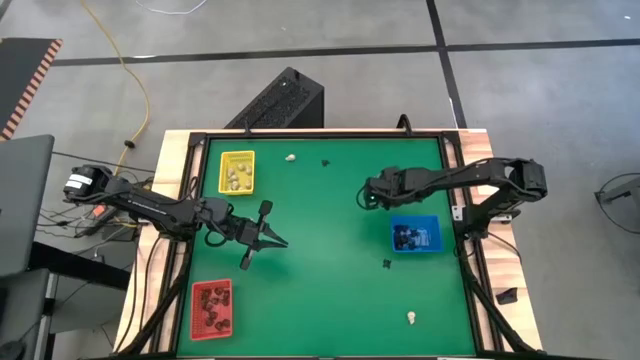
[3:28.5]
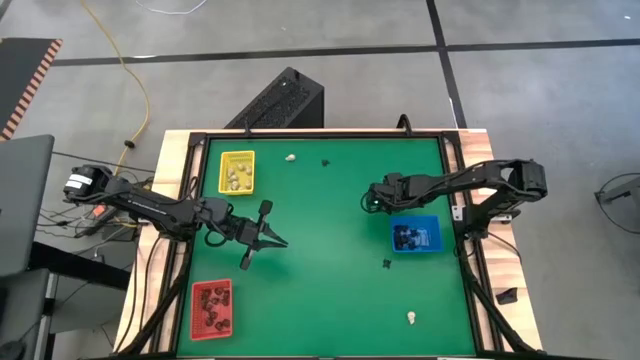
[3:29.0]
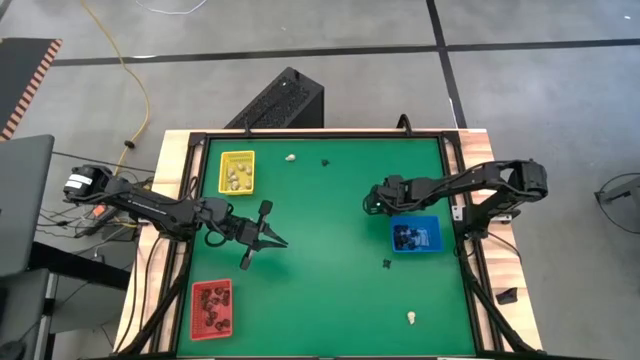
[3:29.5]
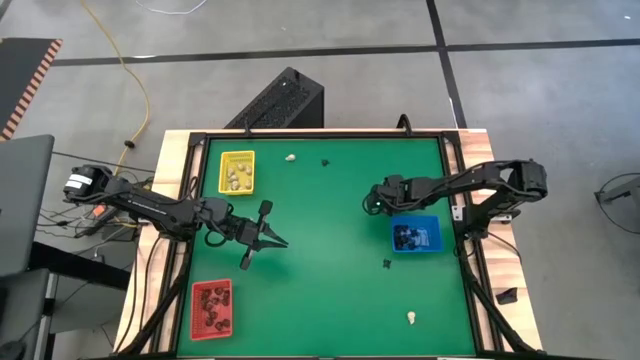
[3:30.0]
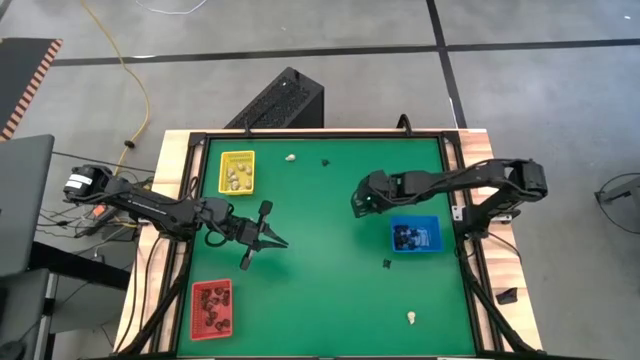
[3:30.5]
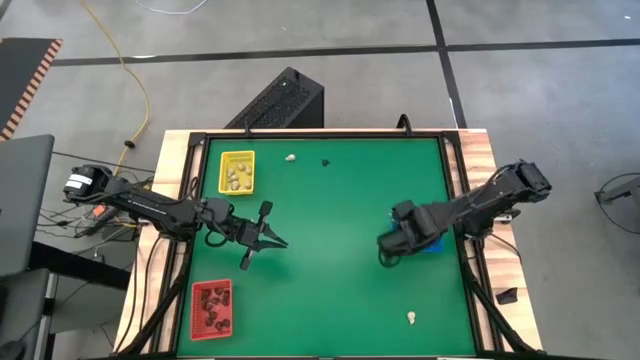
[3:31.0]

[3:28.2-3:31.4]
Task: Sort Halloween decoration
Put the black spider toy into the blue bin

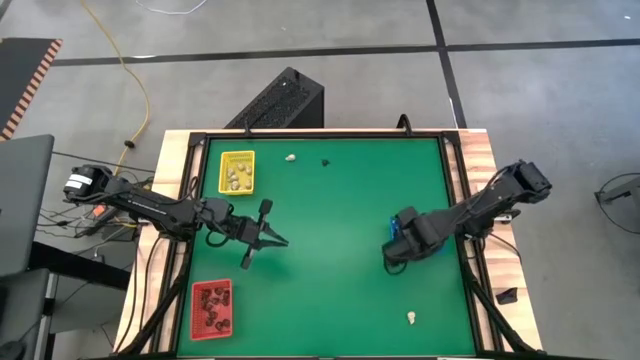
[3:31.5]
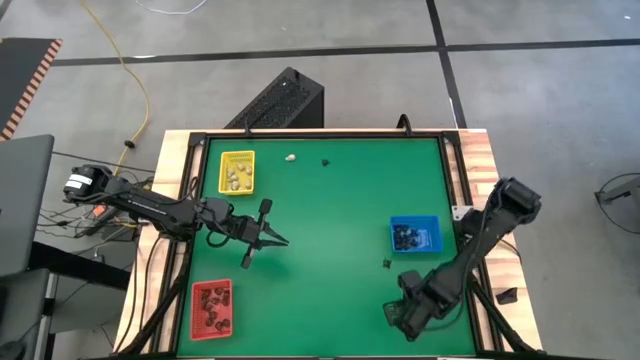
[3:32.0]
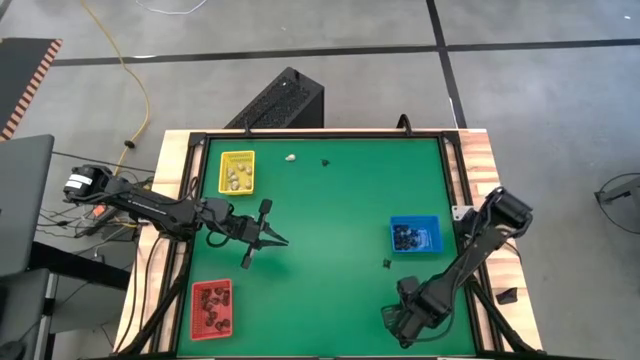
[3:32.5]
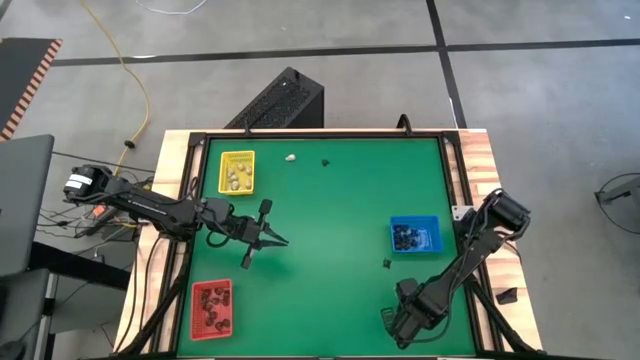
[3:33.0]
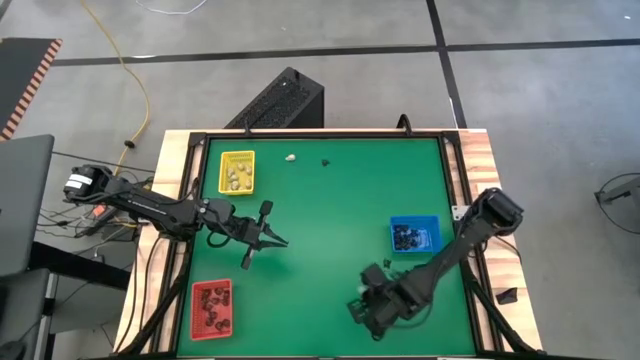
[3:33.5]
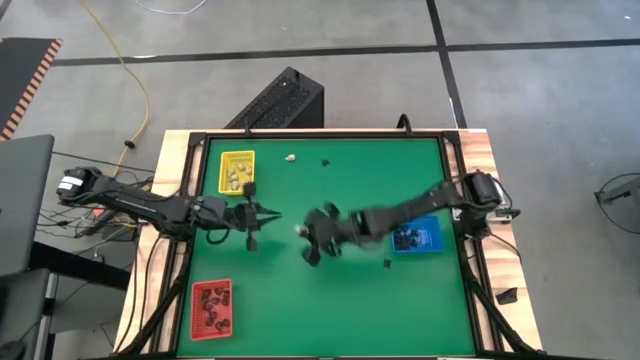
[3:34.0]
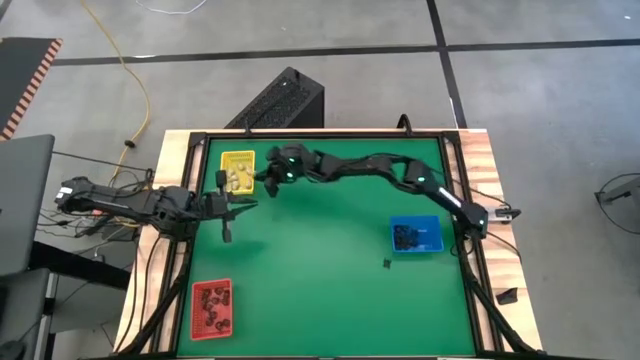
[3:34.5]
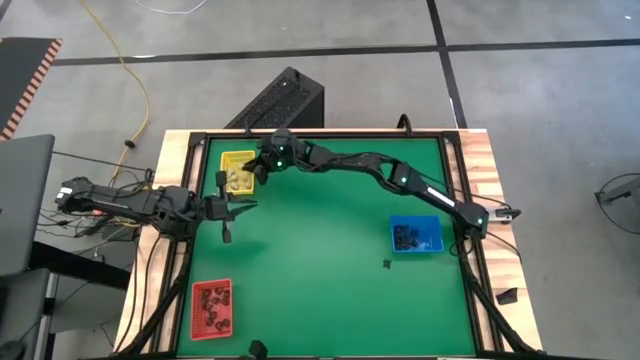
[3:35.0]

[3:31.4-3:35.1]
Put the white skull toy into the yellow bin

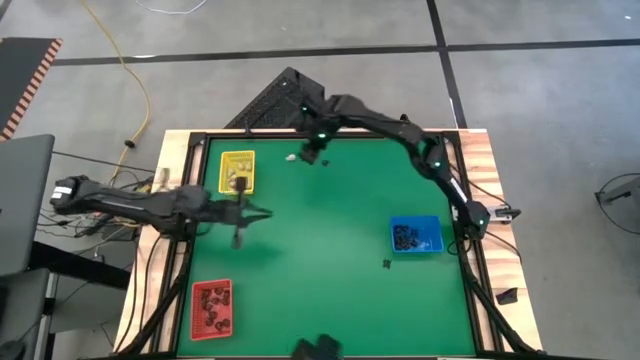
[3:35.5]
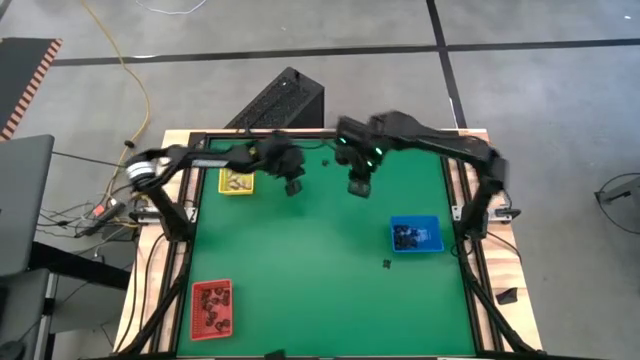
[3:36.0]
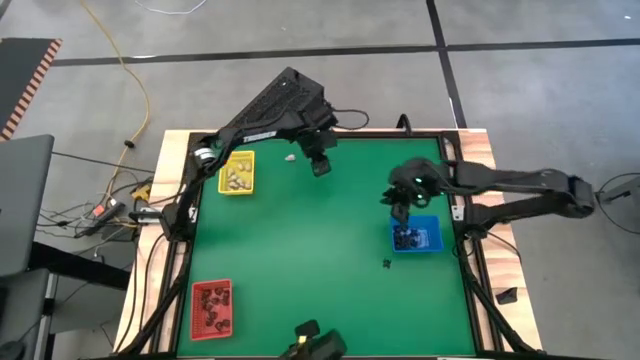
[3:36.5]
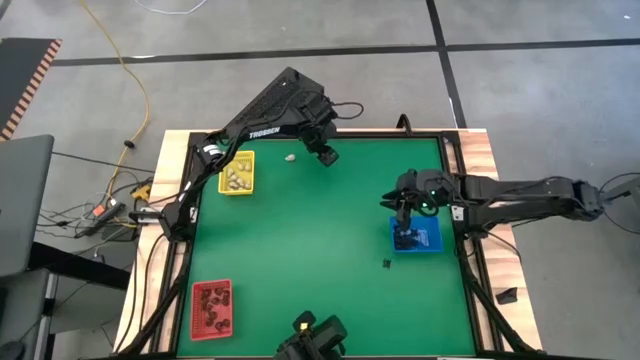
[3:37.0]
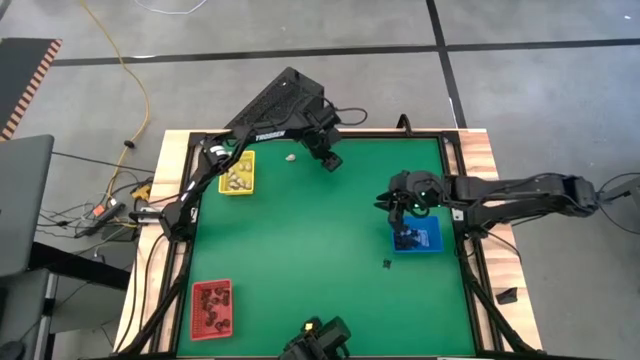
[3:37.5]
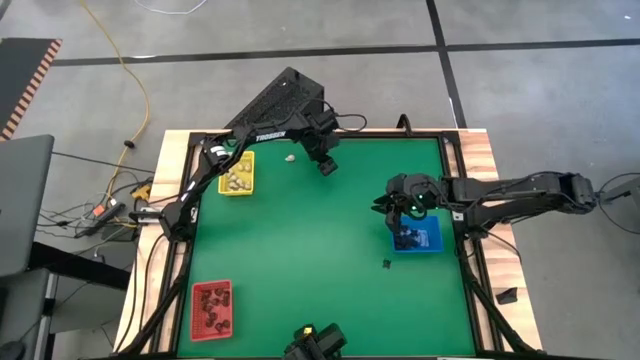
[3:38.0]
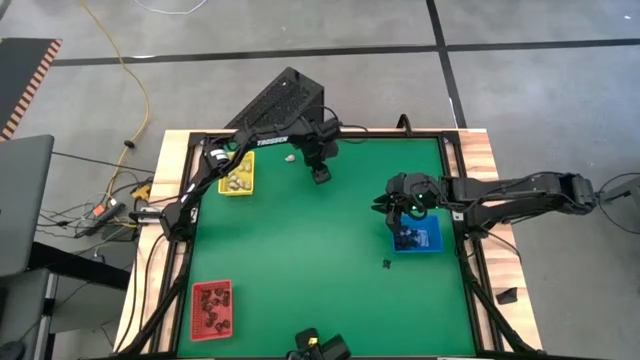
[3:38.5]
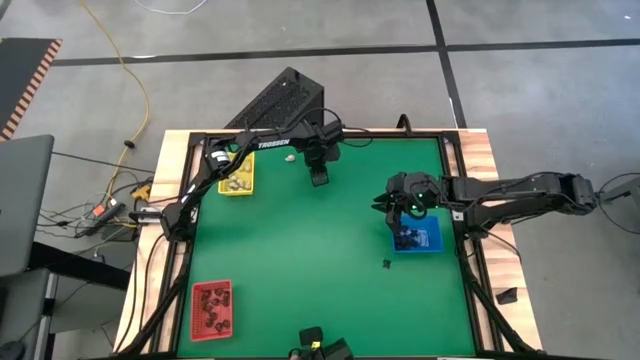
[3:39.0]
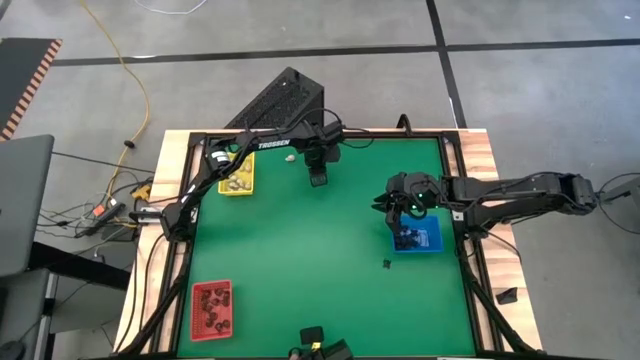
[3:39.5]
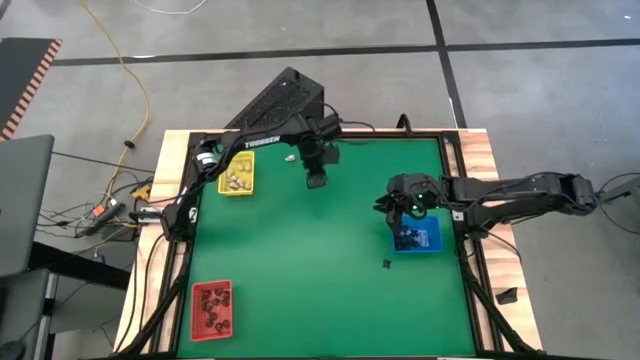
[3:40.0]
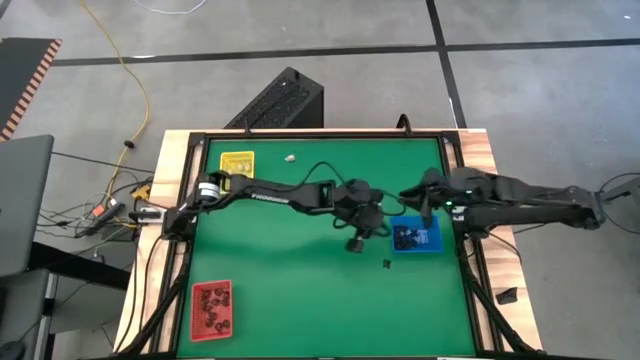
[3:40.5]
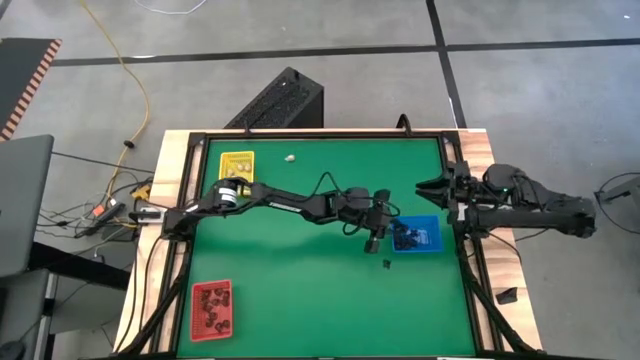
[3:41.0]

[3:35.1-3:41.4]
Put the black spider toy into the blue bin

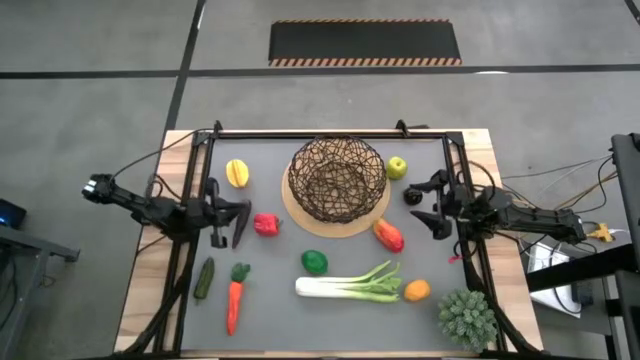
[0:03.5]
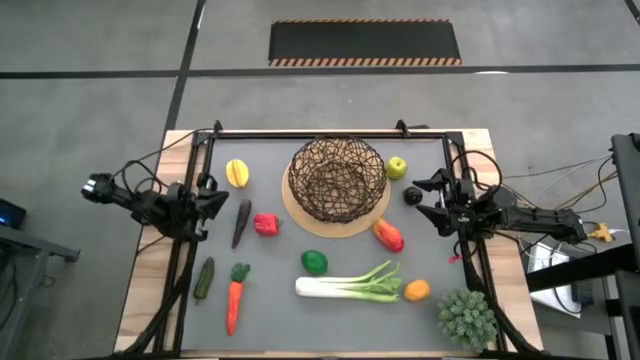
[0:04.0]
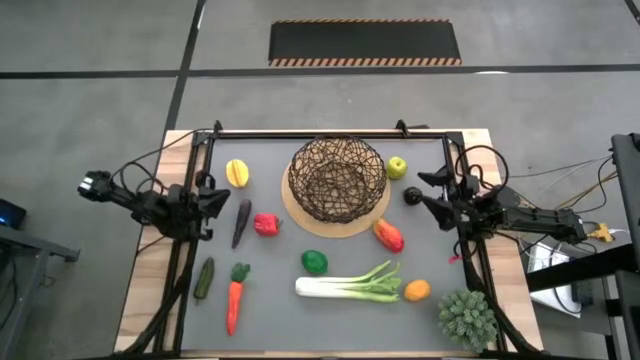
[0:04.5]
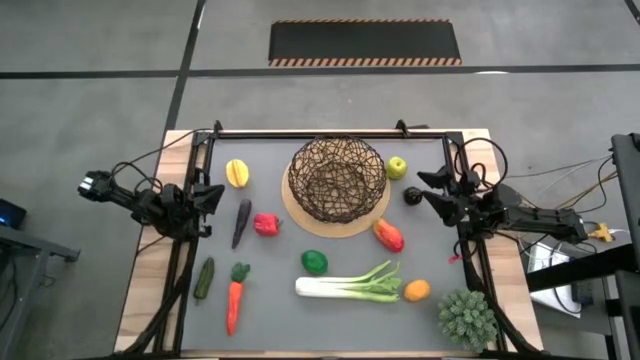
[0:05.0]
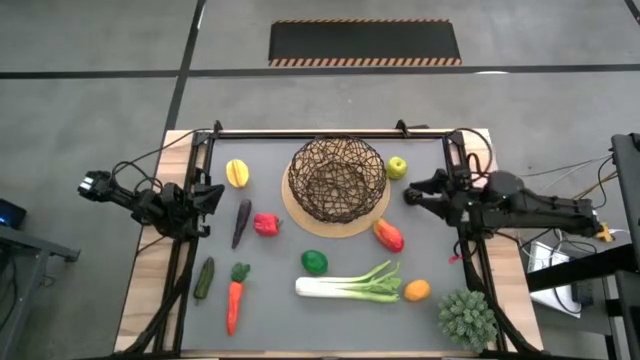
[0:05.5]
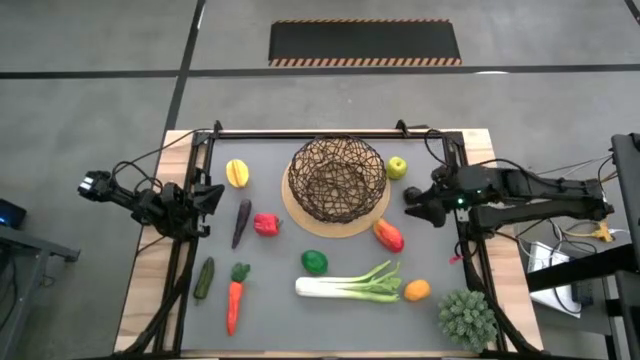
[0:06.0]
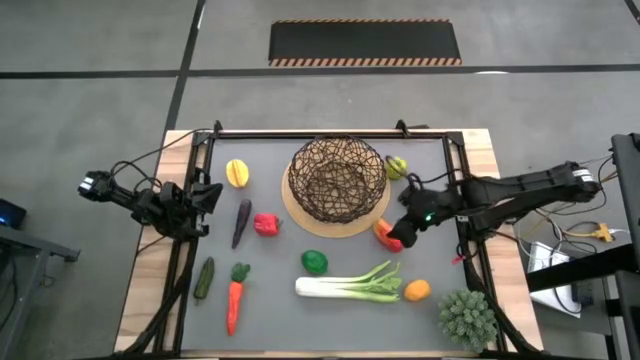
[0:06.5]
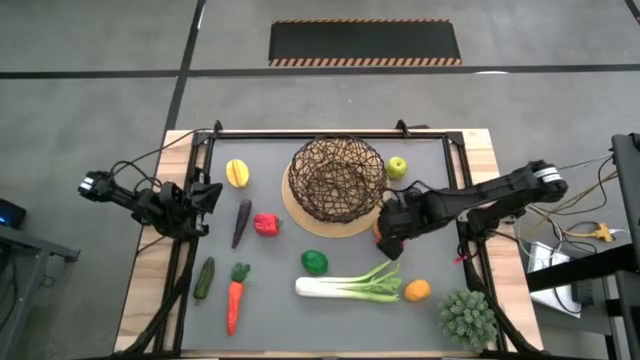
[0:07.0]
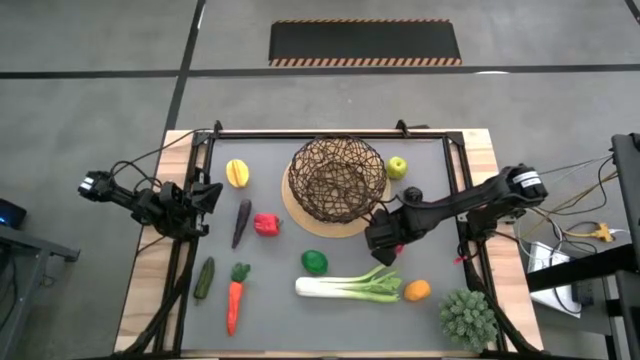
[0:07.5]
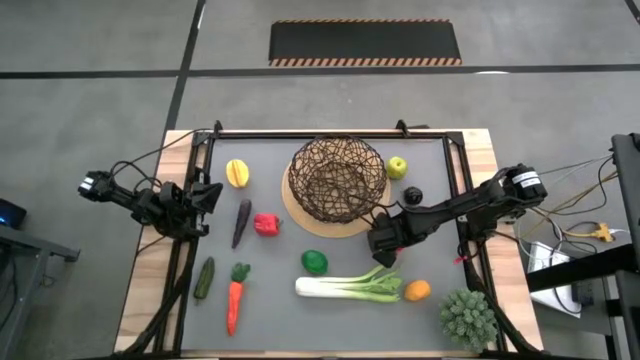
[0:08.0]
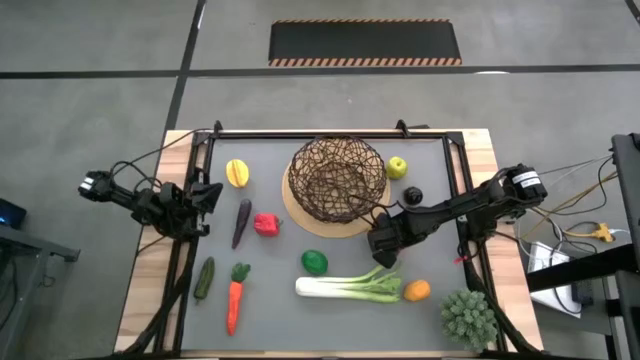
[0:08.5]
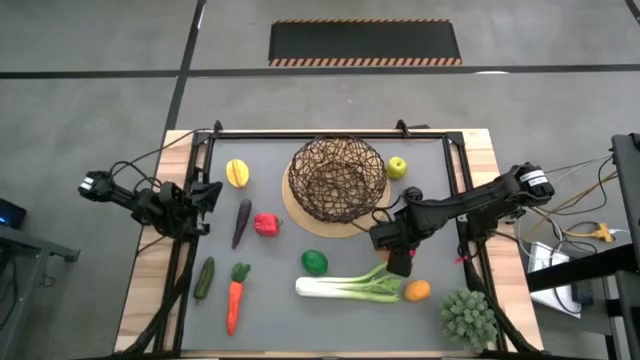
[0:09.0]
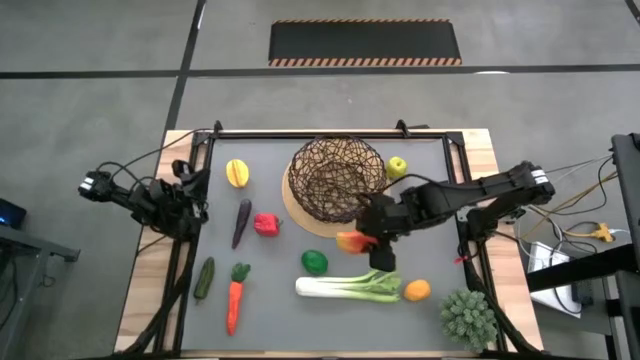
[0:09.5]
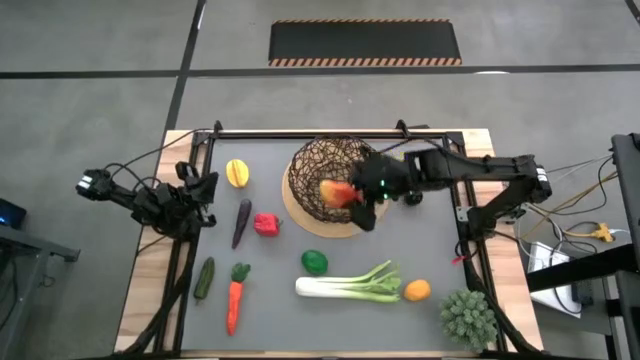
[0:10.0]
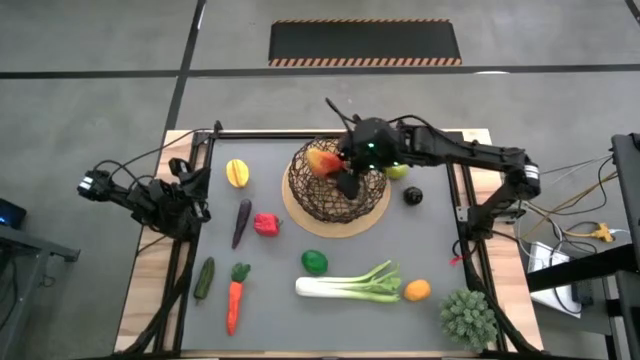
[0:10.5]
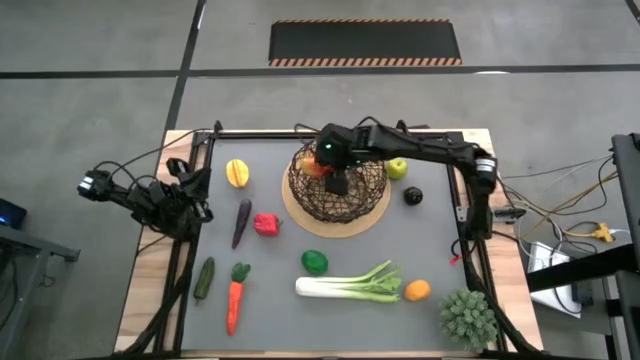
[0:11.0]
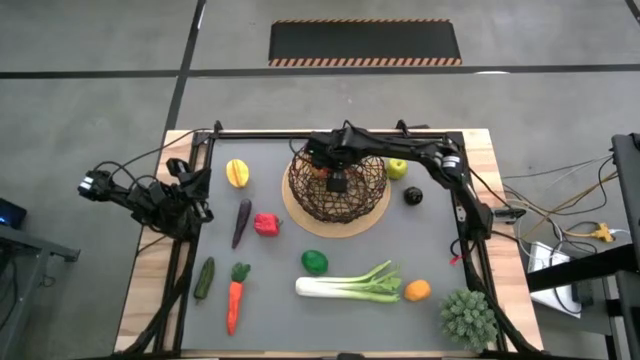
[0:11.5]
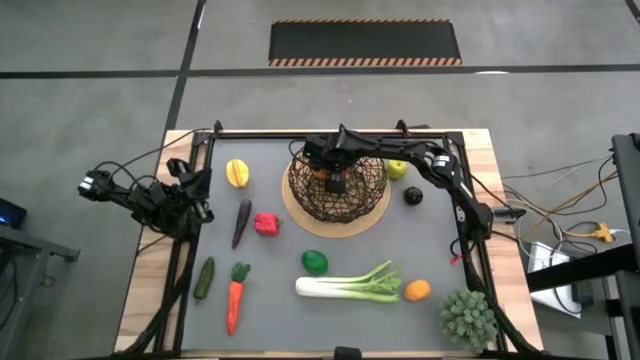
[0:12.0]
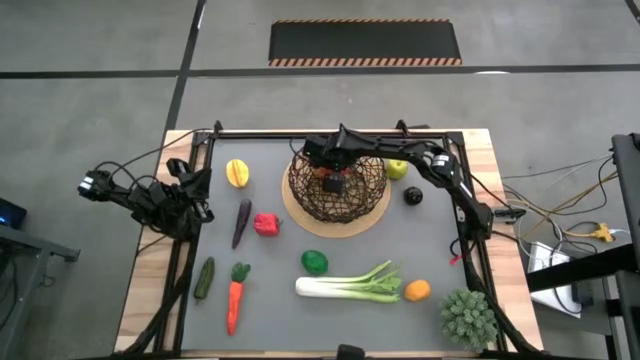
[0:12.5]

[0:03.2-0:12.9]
Task: Build produce basket
Put the mango into the basket
